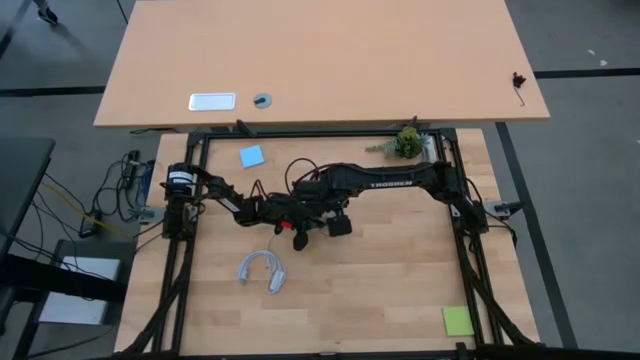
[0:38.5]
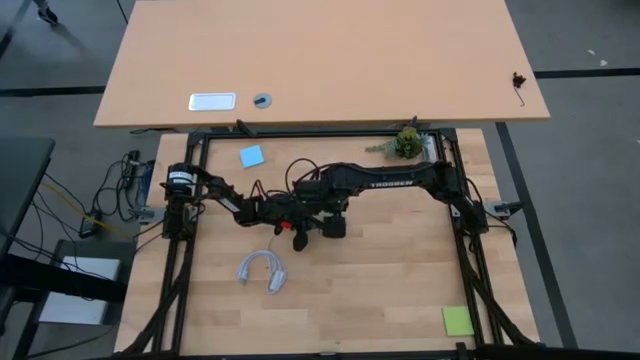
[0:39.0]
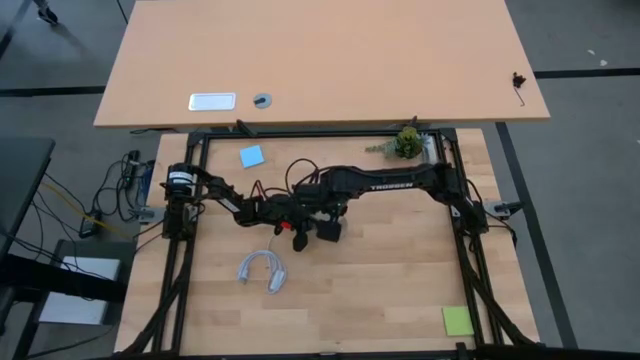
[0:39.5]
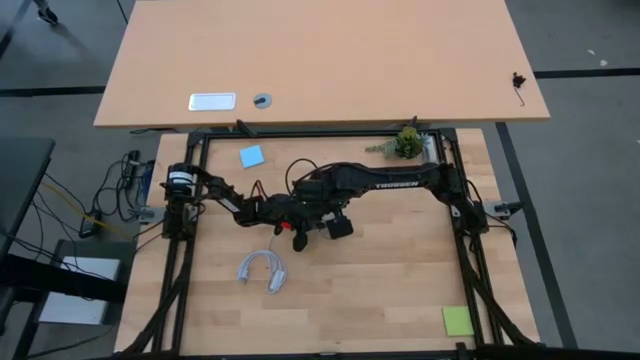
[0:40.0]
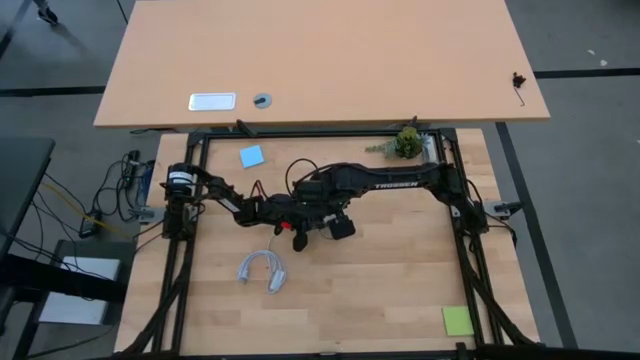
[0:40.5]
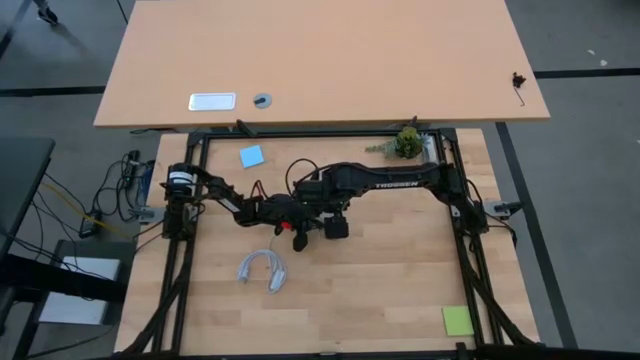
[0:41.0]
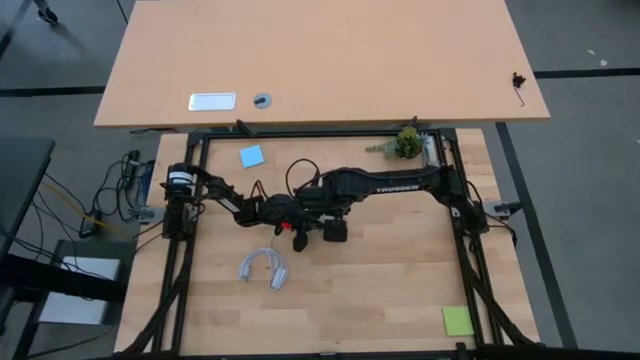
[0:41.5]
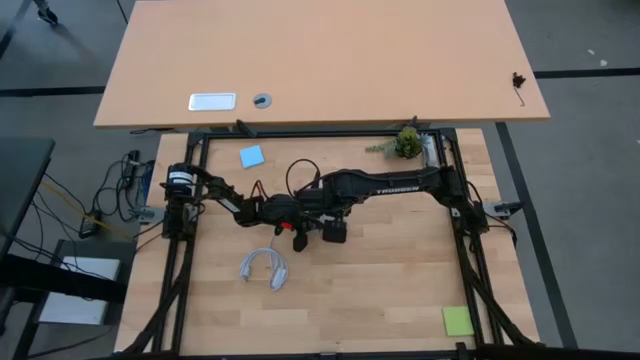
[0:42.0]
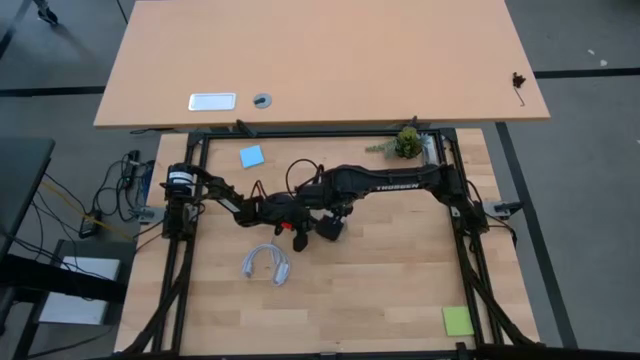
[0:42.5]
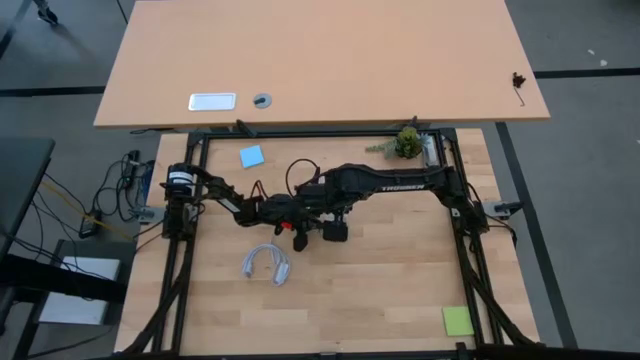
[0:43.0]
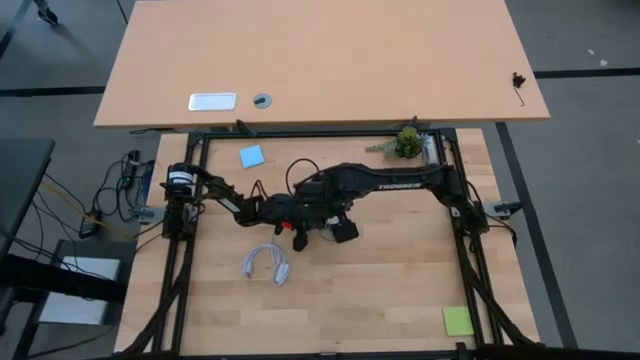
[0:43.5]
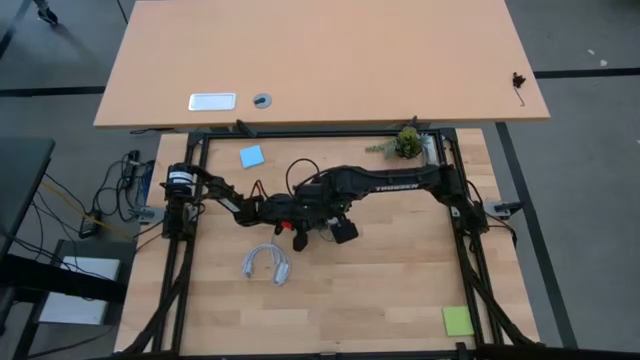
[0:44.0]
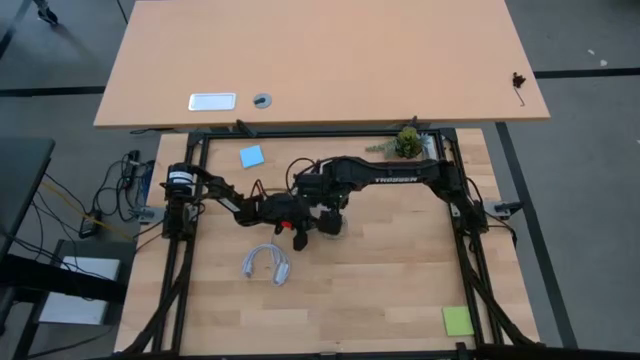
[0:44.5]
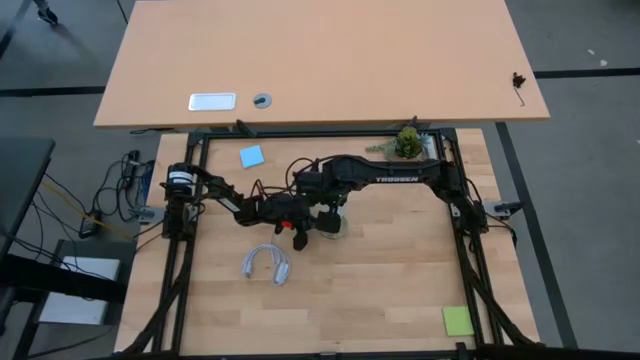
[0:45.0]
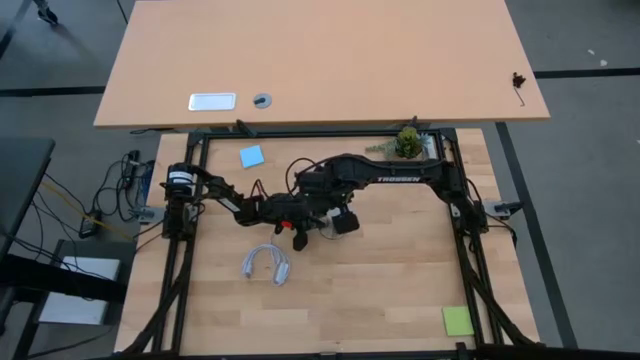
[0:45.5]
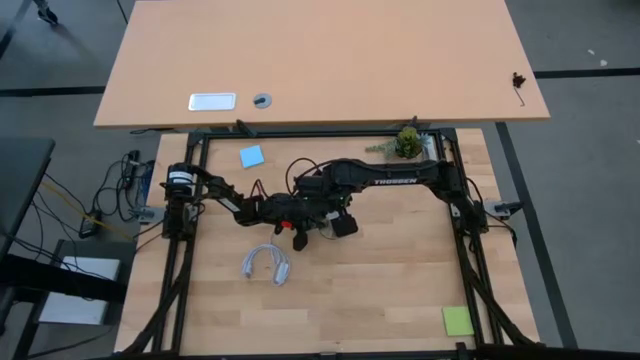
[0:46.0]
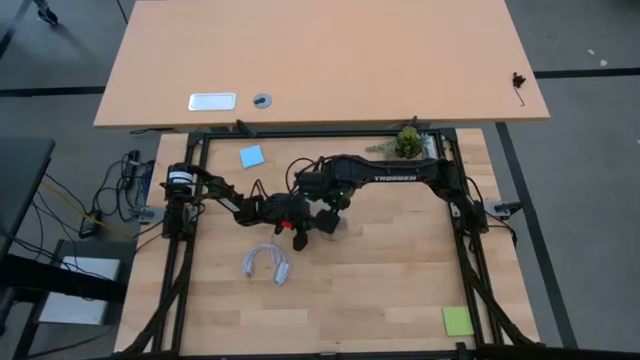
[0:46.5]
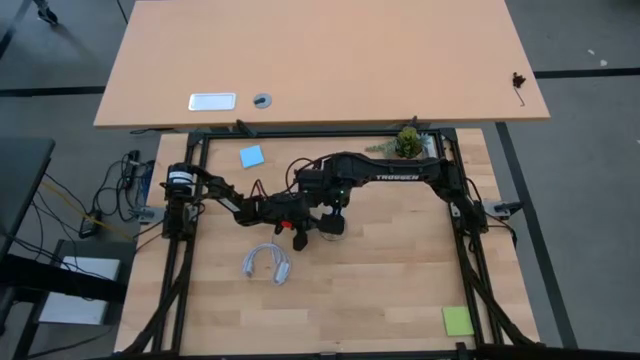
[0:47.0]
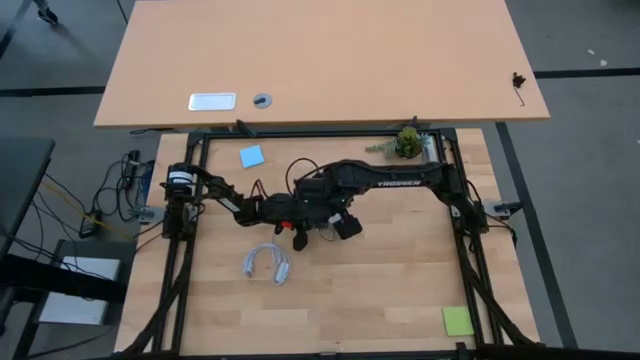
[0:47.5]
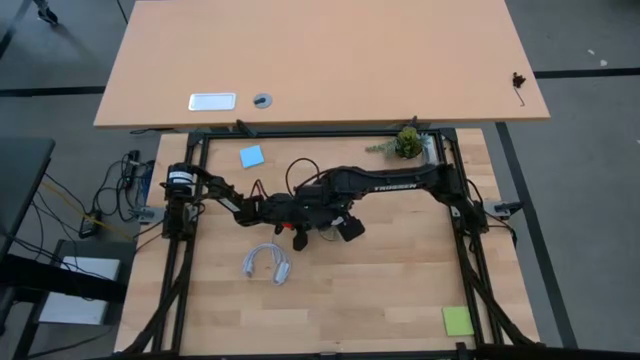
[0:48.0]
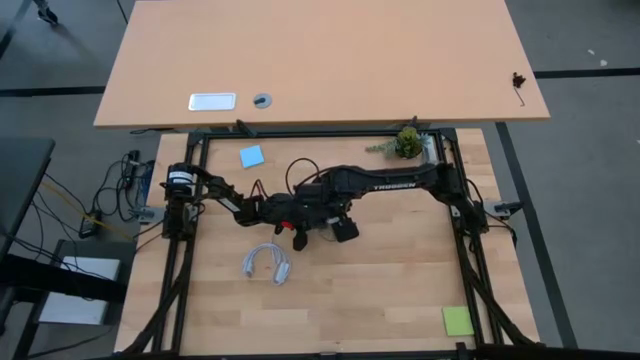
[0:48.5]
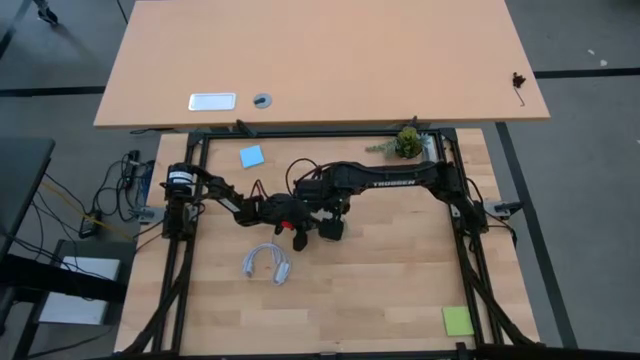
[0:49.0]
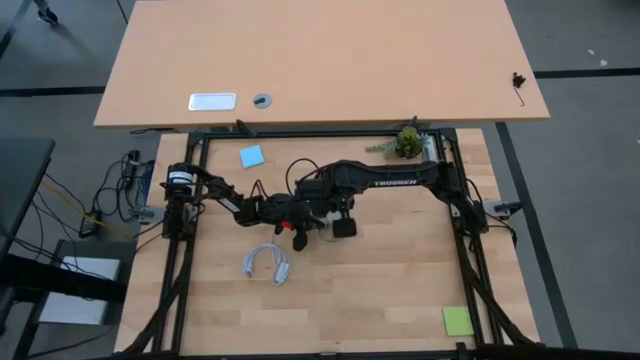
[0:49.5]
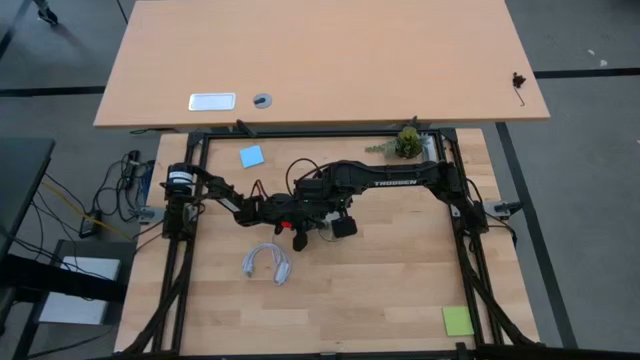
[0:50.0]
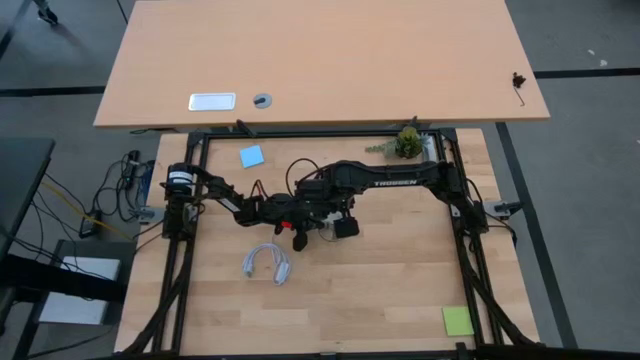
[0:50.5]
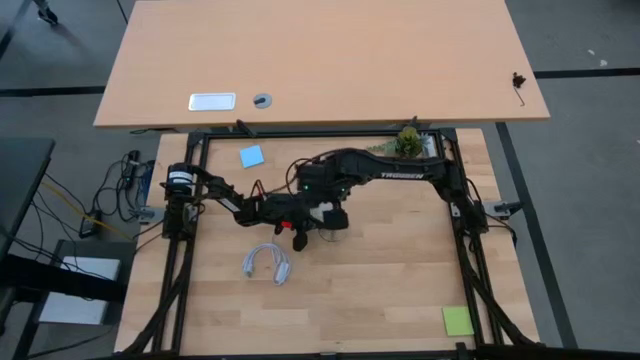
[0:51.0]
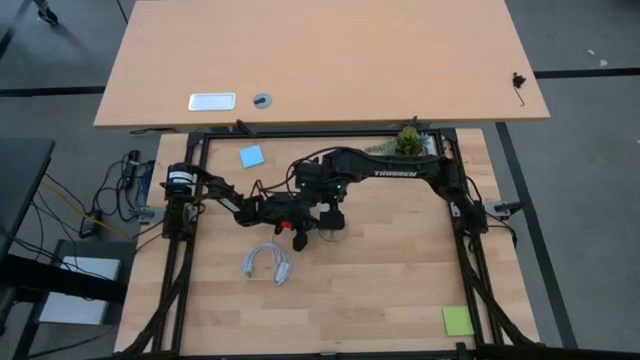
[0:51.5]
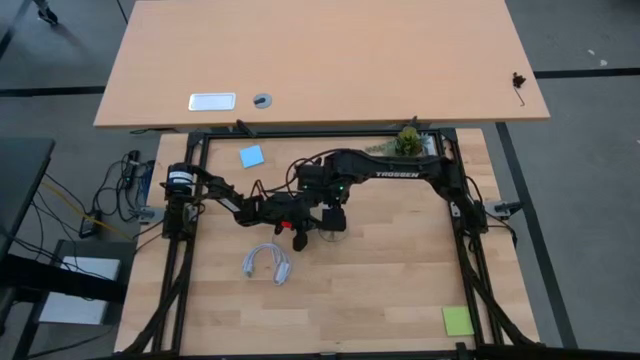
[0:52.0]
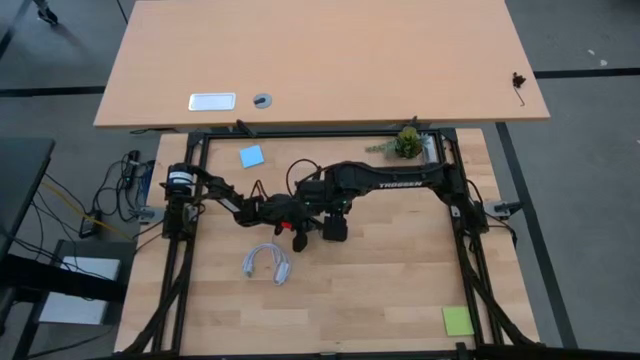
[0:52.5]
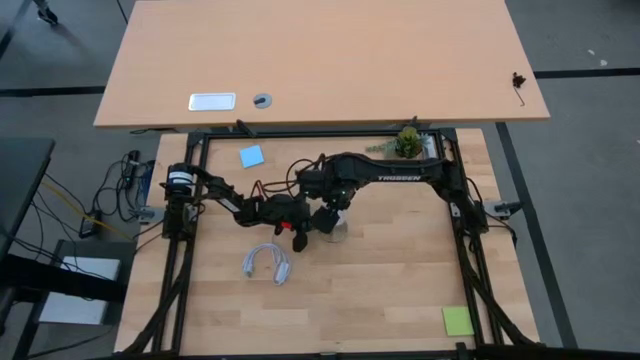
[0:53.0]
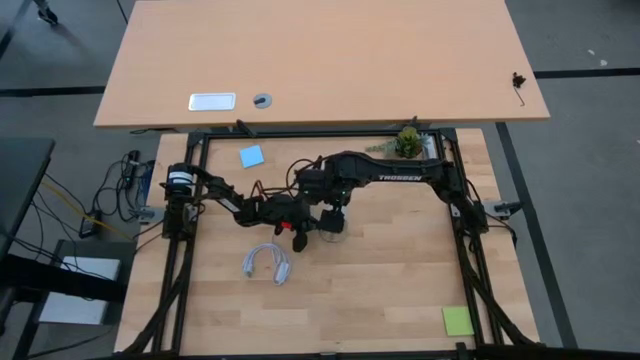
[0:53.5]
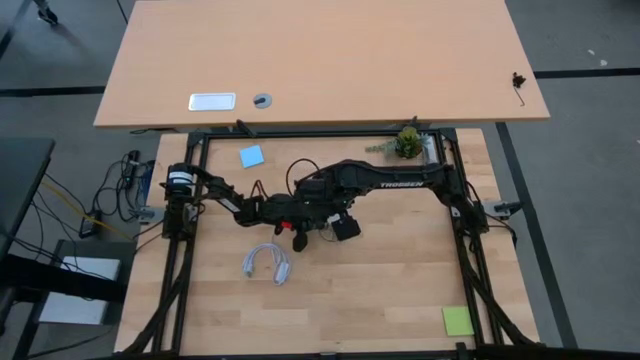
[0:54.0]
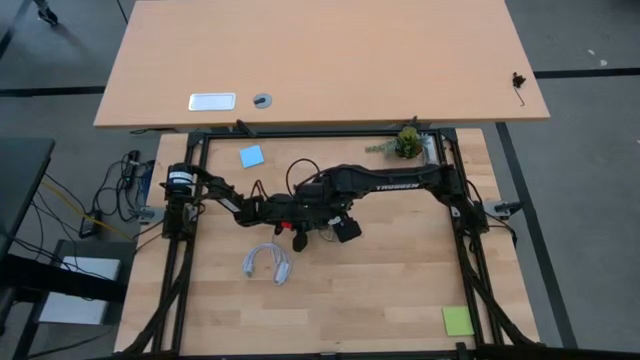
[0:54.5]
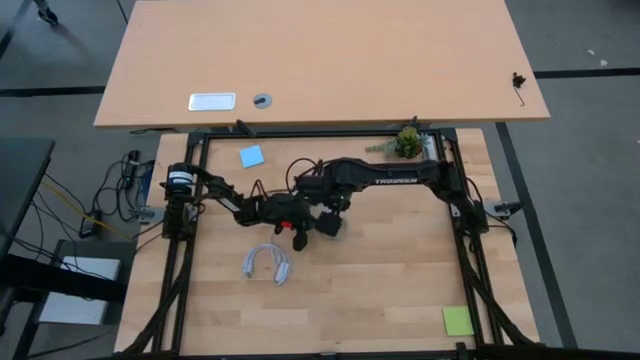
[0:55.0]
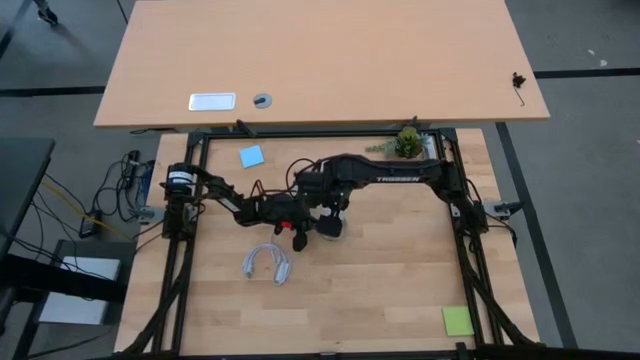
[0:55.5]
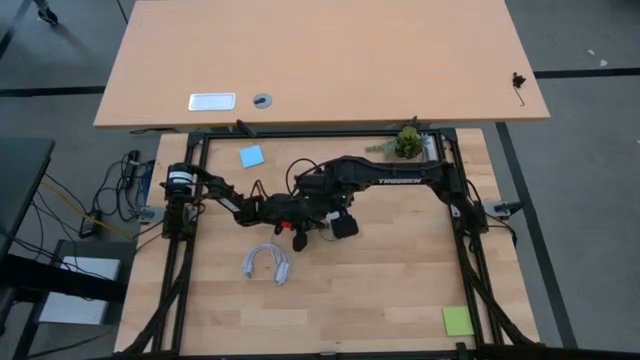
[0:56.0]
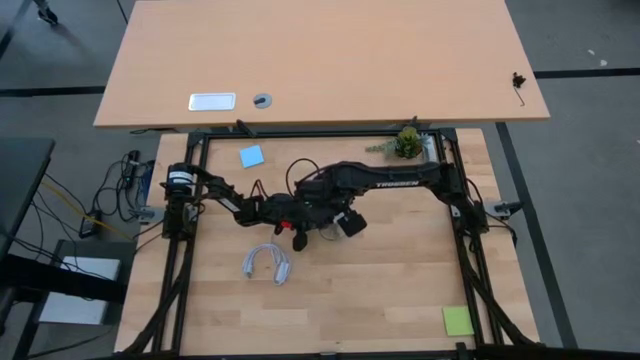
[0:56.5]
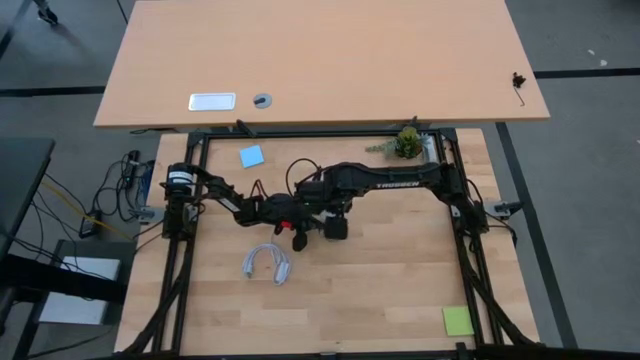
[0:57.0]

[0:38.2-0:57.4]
Task: Screw lightbulb
Insert the light bulb into the lamp
